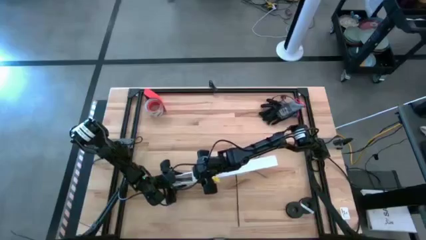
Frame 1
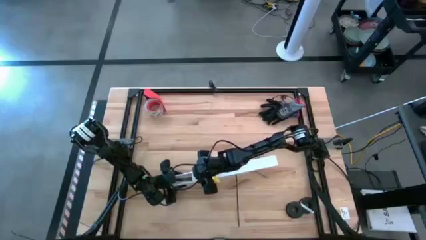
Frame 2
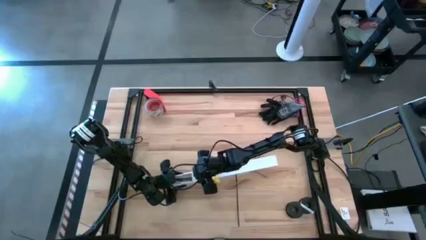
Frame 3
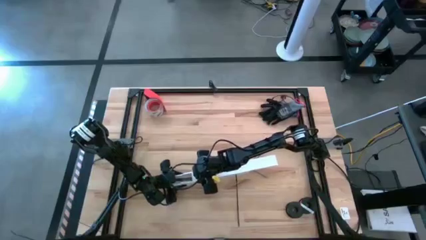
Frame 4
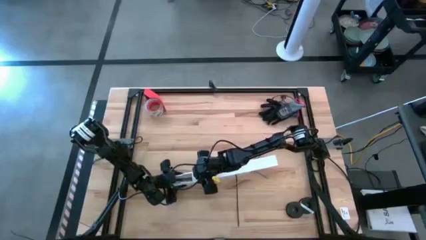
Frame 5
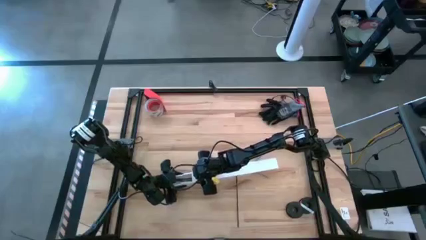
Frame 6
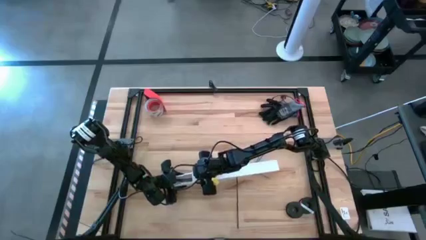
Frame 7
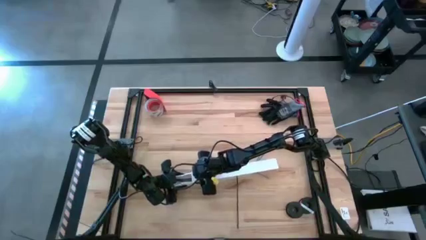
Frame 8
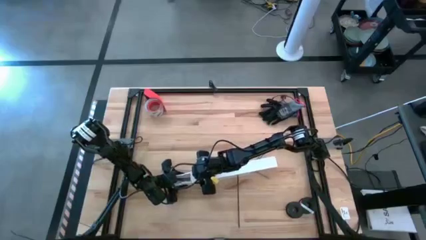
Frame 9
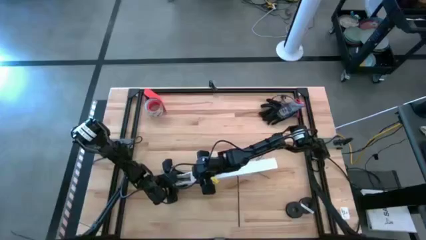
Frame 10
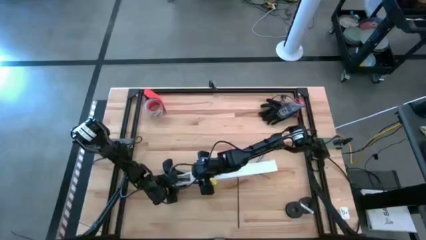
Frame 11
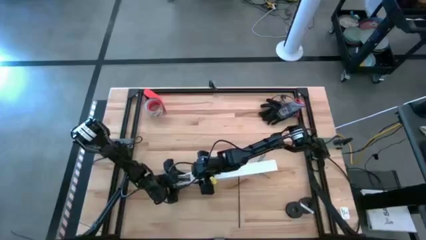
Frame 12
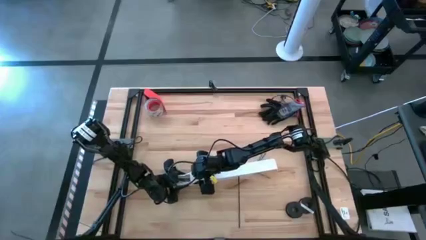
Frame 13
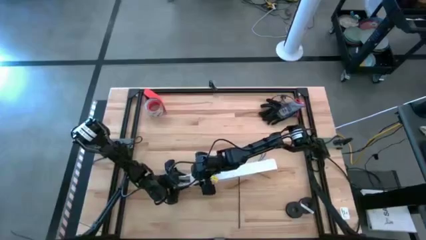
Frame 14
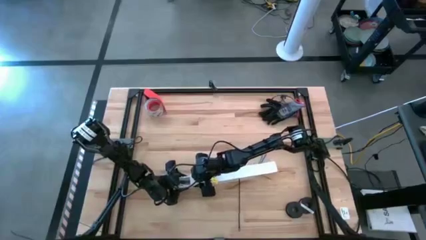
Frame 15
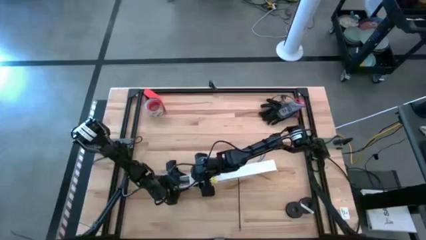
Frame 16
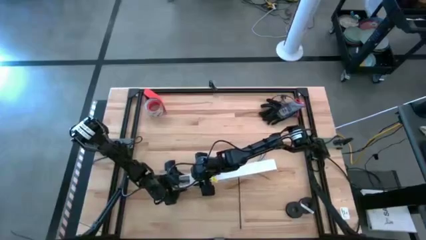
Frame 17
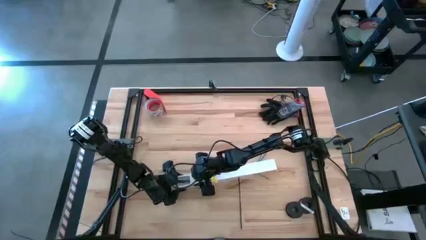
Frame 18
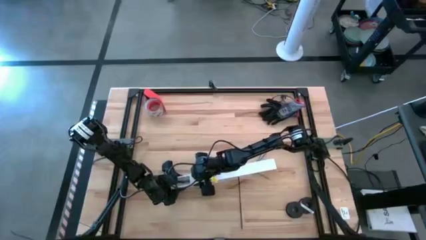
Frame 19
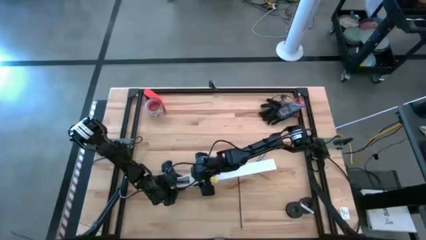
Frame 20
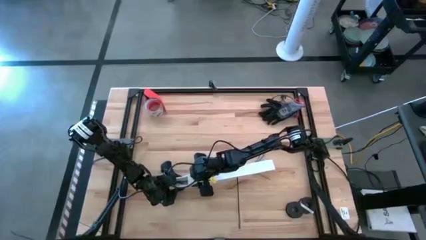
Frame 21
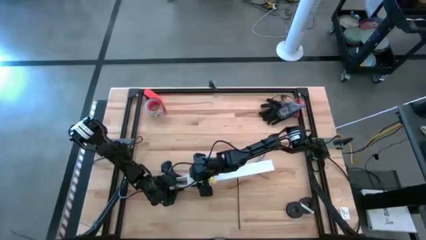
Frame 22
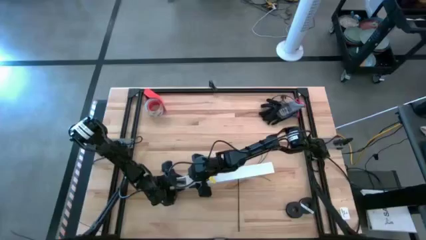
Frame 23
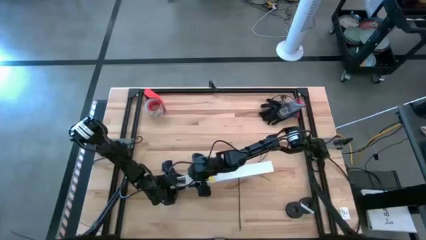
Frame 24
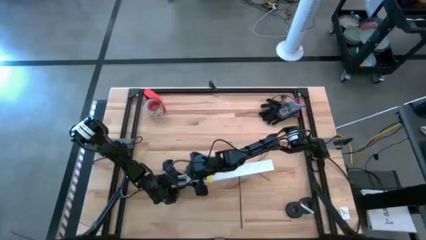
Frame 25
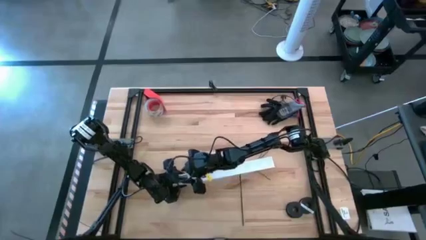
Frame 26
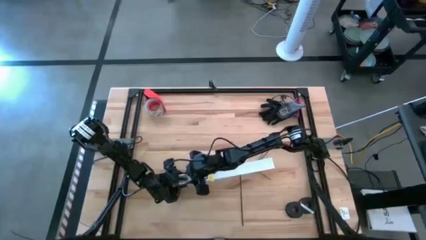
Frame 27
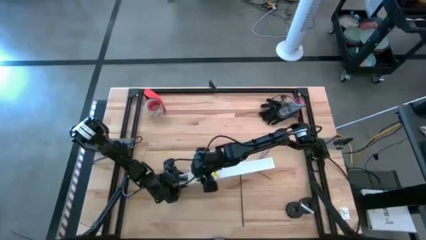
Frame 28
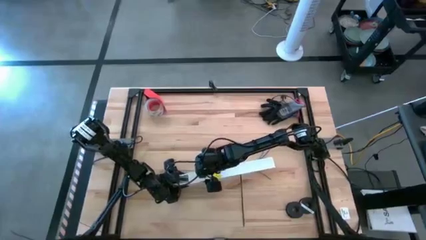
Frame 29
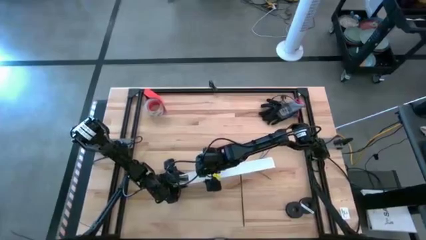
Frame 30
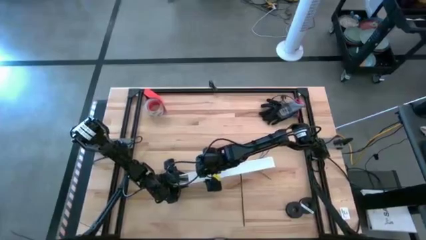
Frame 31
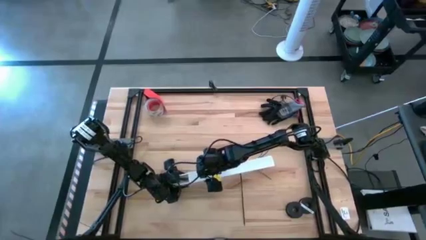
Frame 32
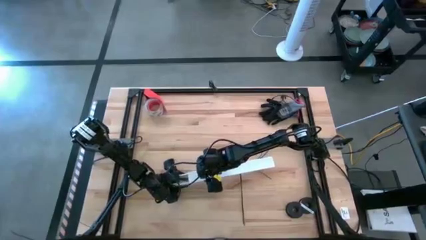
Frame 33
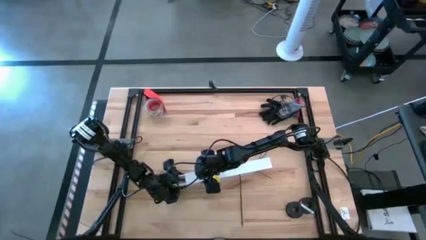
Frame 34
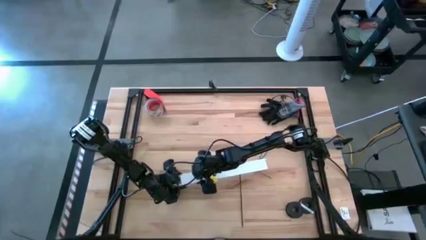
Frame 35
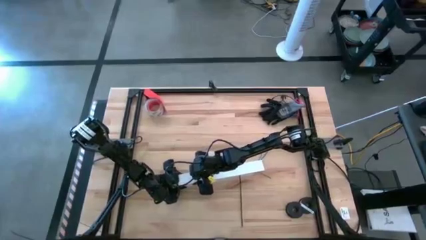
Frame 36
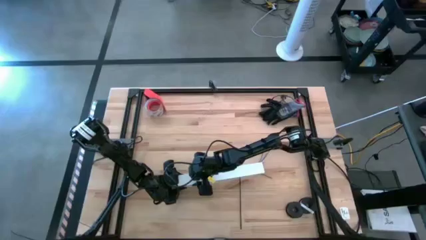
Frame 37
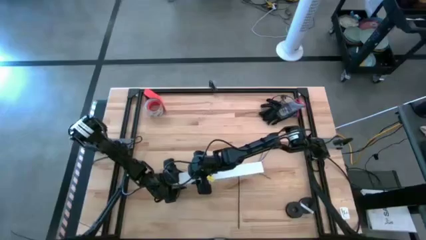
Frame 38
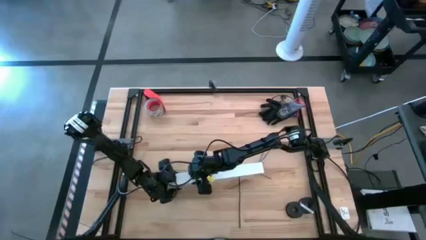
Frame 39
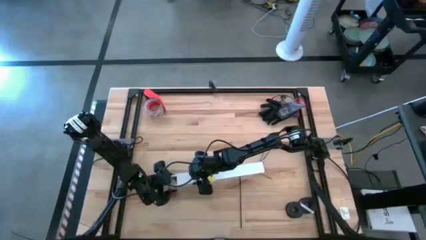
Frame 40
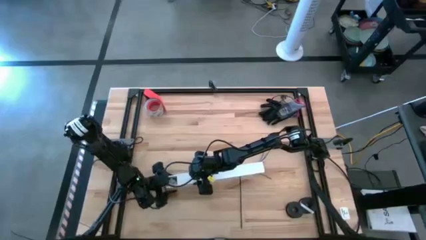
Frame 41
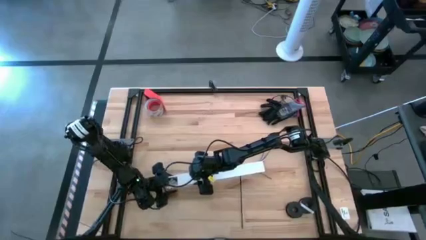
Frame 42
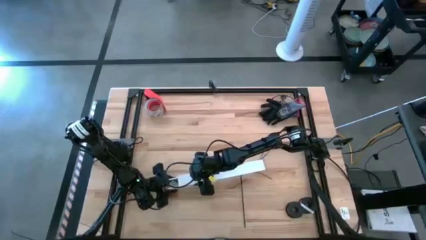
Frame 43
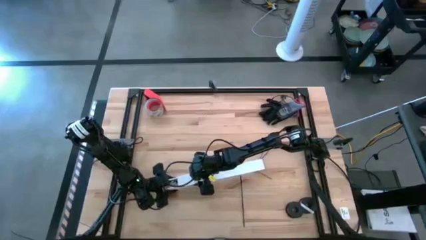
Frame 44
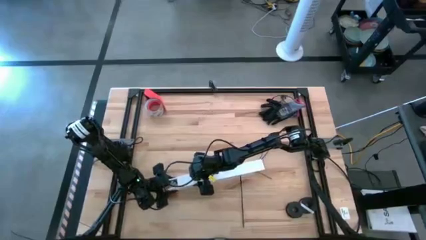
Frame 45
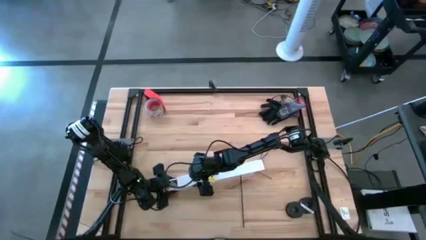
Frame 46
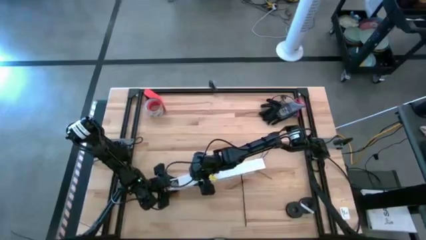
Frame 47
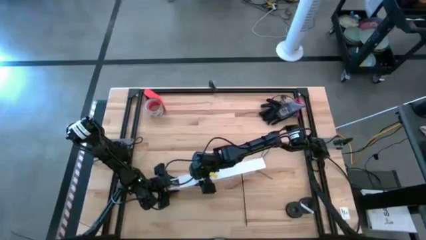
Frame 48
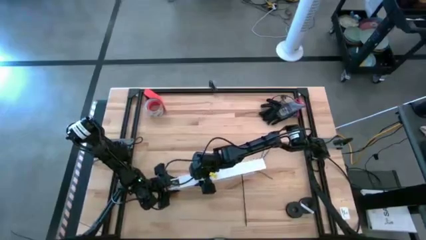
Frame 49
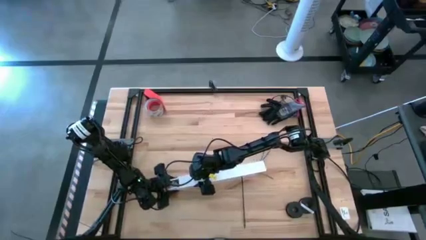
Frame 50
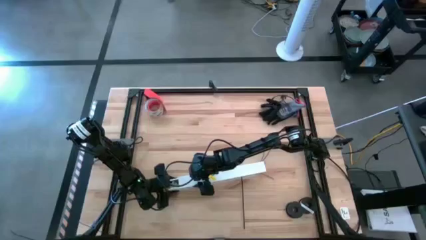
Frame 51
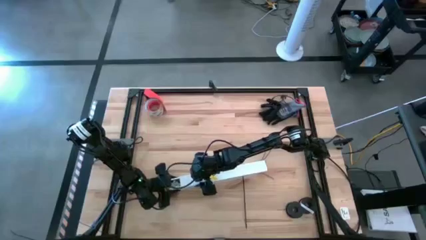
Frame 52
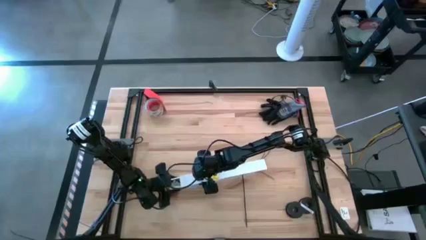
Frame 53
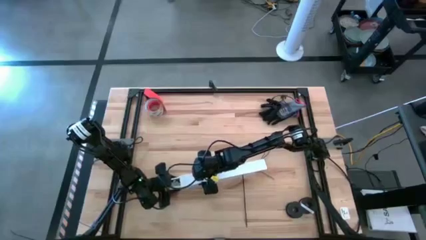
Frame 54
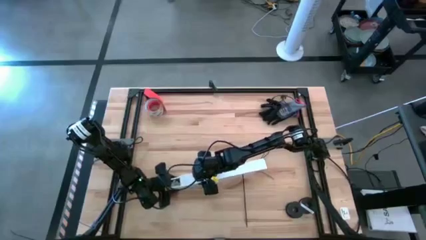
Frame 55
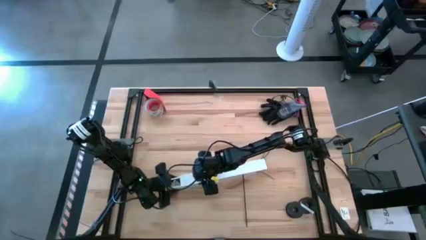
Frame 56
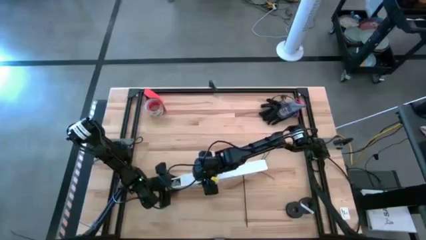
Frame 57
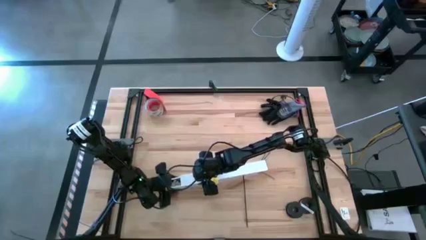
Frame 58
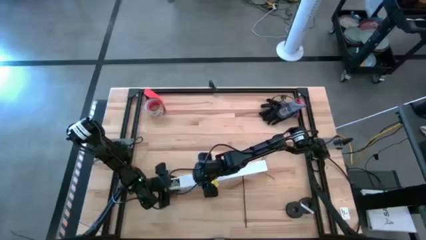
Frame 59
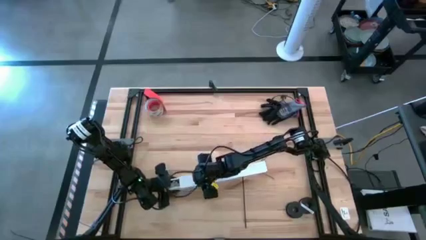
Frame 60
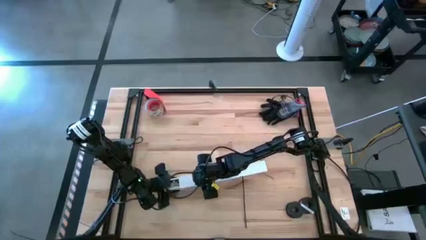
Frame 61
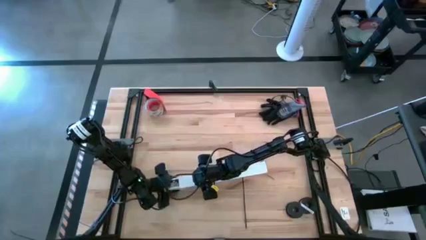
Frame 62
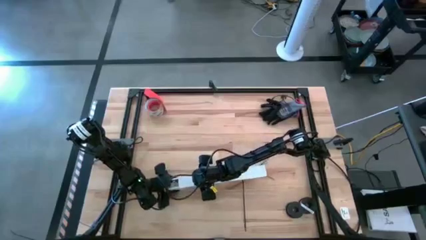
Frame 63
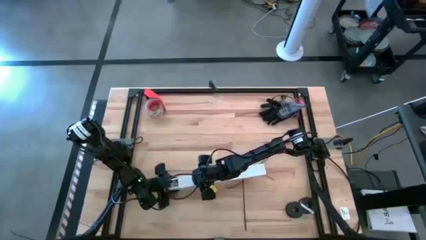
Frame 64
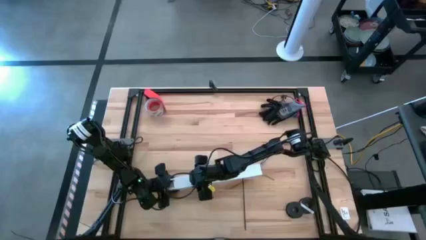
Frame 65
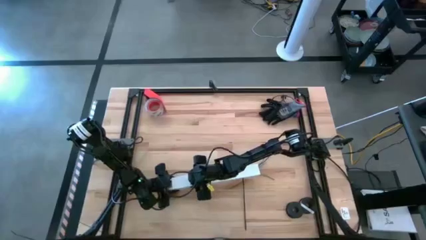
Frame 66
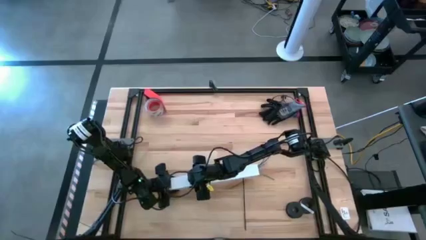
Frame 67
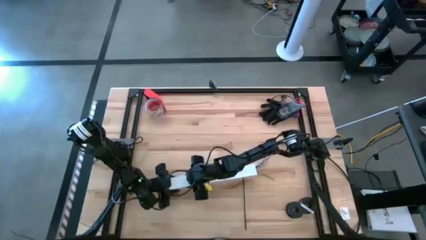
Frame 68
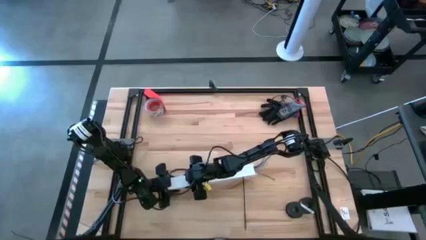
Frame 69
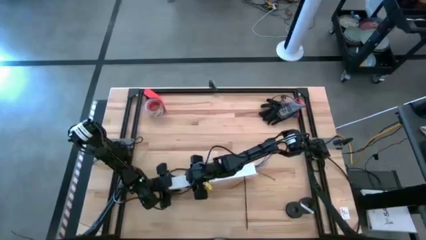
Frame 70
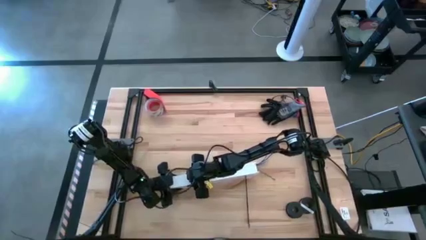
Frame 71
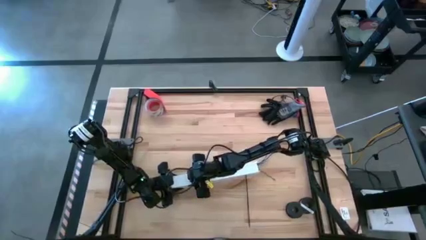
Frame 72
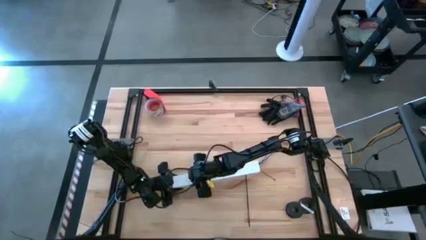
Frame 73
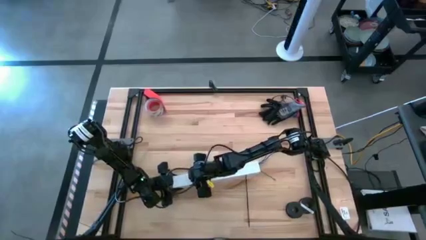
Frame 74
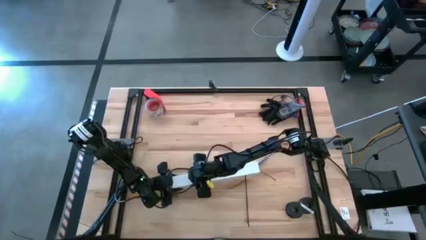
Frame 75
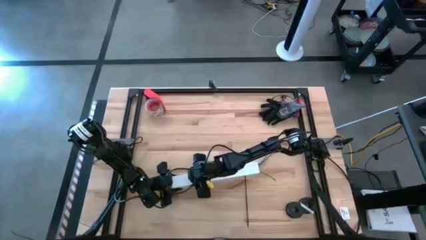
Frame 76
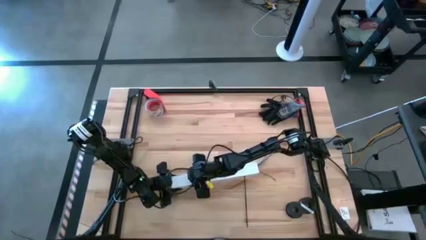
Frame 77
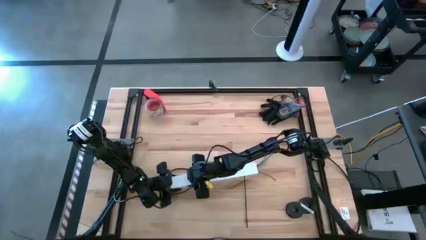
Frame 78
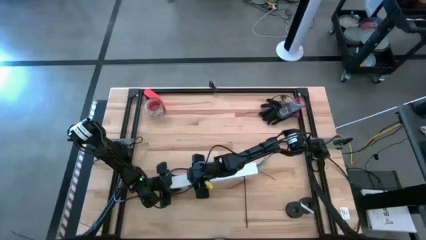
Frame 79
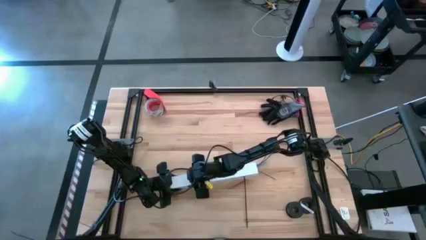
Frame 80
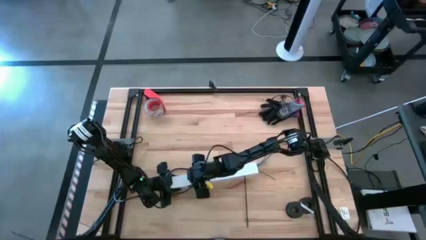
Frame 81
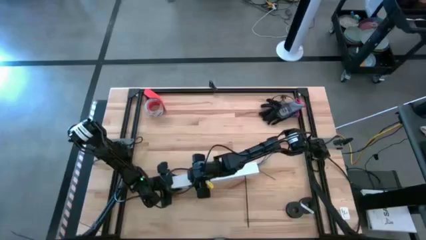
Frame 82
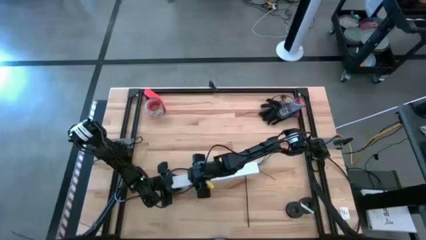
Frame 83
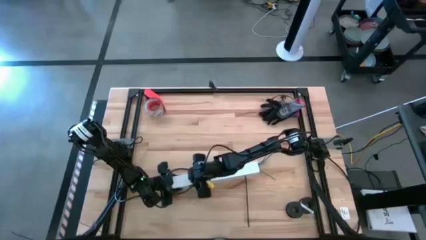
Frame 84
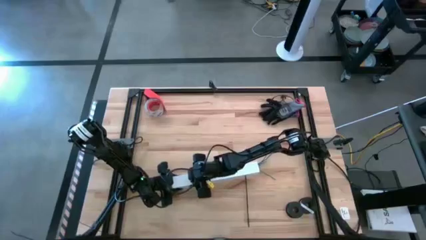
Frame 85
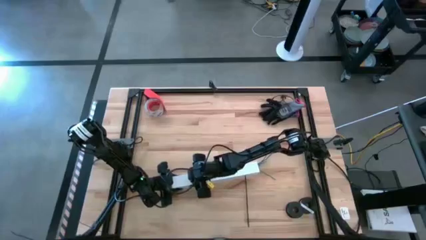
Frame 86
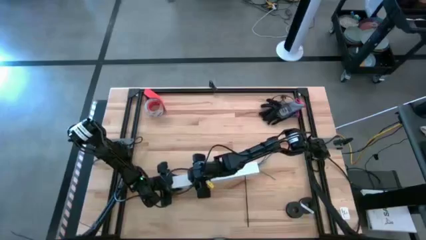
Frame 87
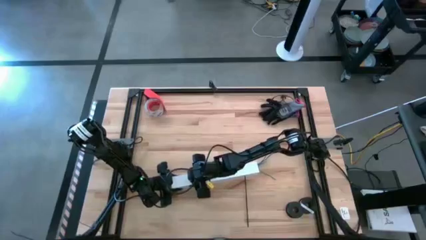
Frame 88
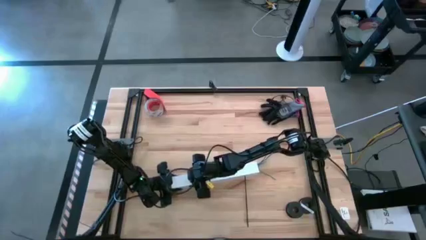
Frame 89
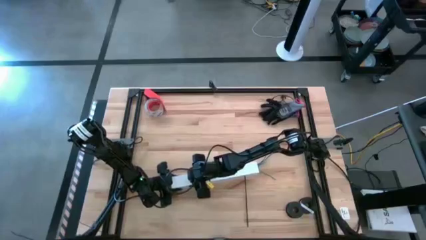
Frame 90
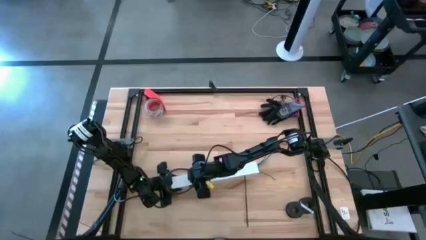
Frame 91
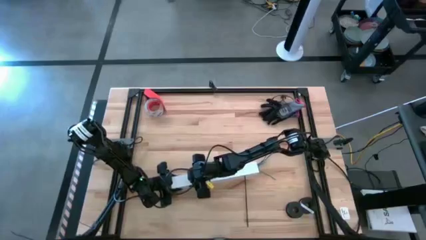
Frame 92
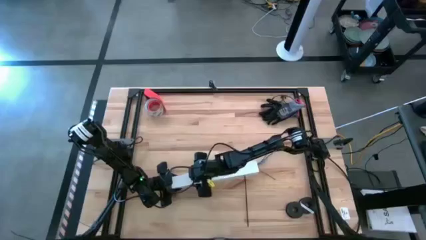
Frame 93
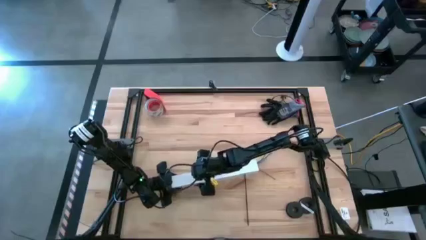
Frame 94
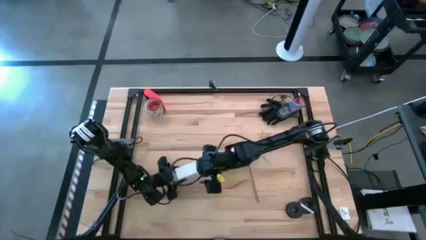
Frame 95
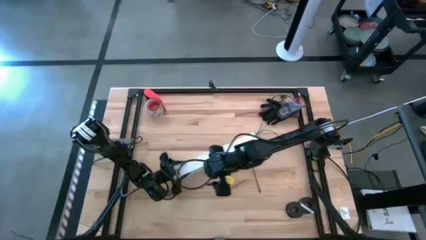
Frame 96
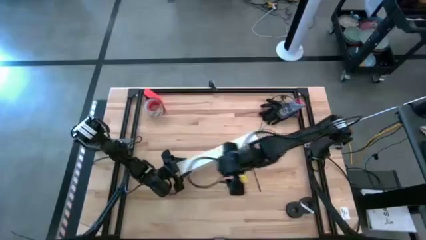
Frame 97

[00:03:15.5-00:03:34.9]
Task: Ziptie cables
Close the cable duct
